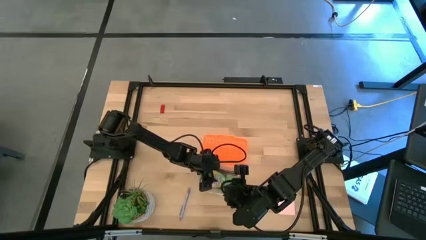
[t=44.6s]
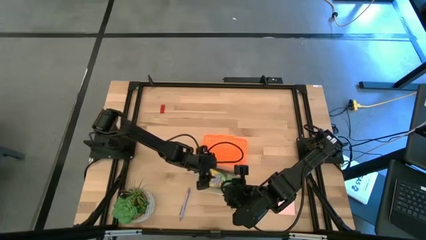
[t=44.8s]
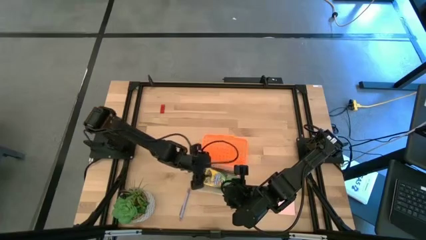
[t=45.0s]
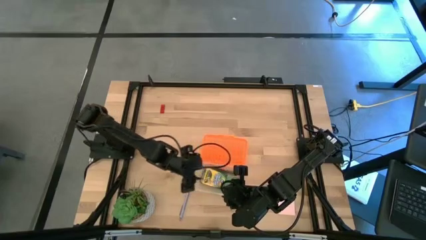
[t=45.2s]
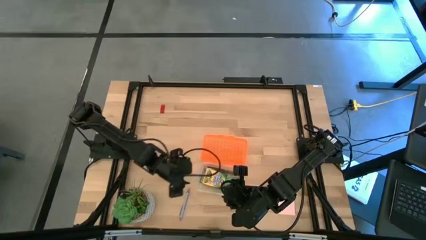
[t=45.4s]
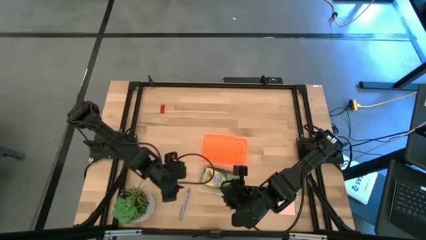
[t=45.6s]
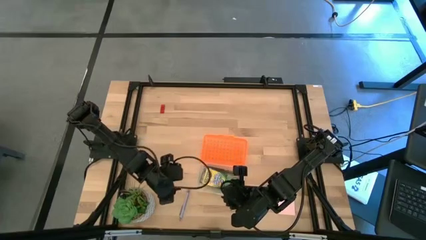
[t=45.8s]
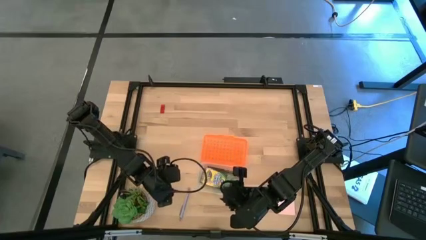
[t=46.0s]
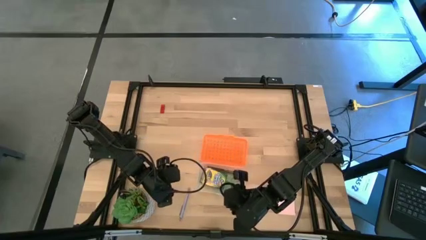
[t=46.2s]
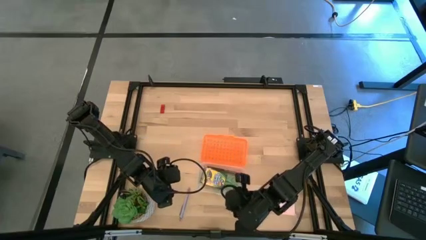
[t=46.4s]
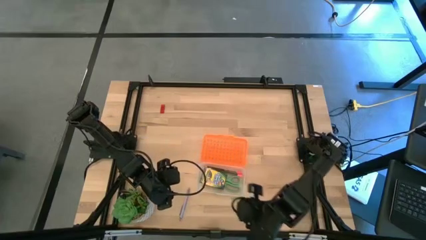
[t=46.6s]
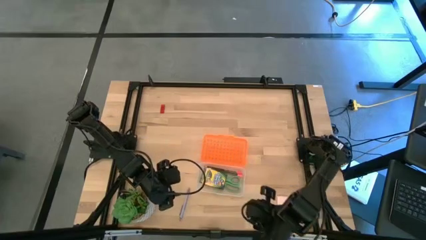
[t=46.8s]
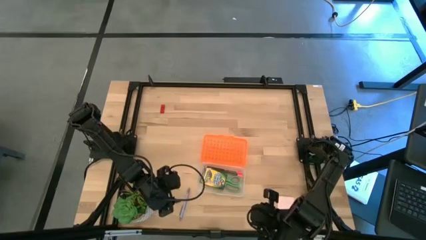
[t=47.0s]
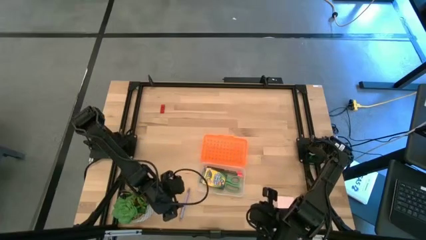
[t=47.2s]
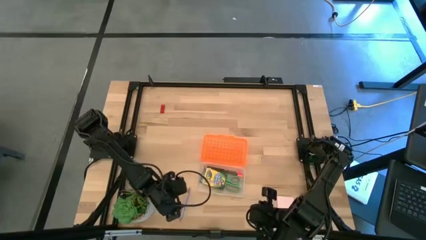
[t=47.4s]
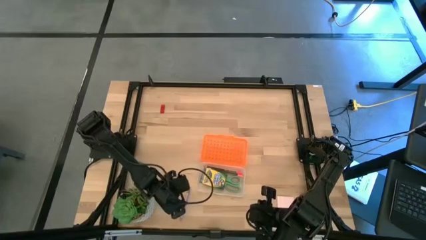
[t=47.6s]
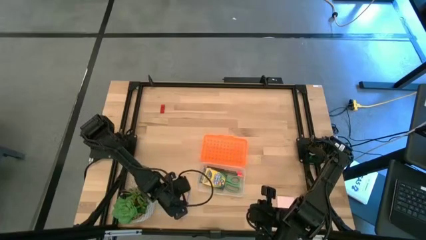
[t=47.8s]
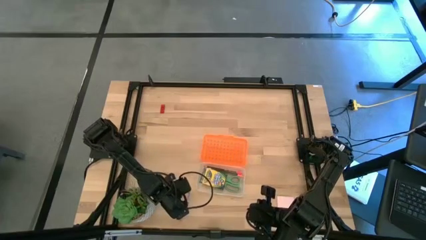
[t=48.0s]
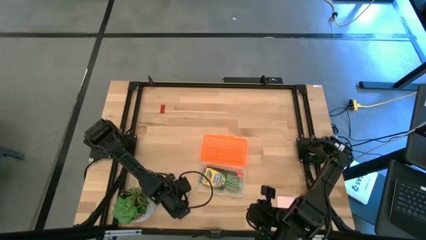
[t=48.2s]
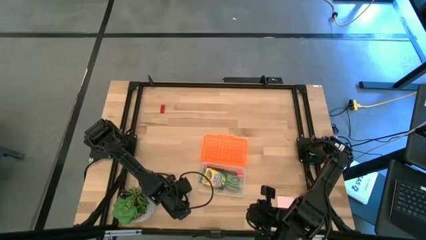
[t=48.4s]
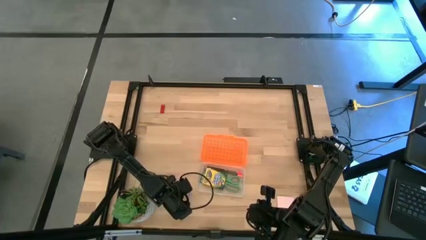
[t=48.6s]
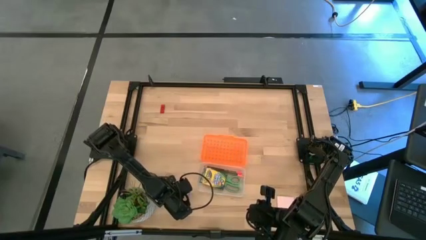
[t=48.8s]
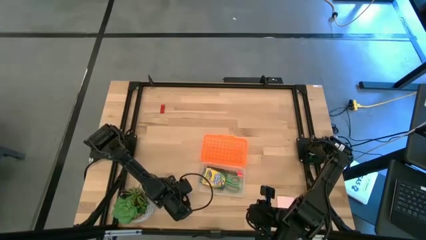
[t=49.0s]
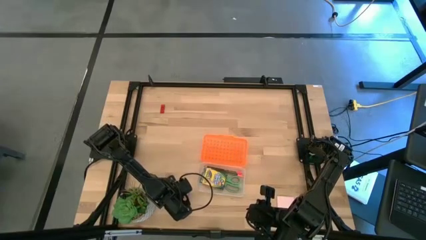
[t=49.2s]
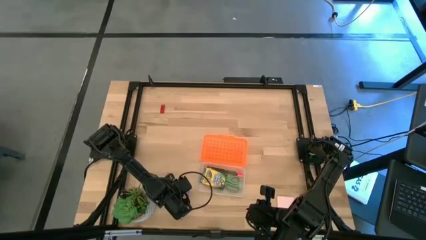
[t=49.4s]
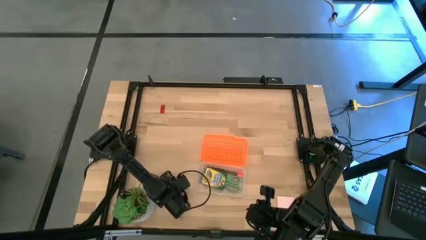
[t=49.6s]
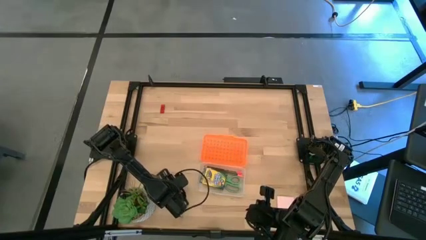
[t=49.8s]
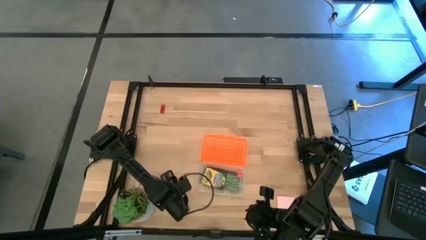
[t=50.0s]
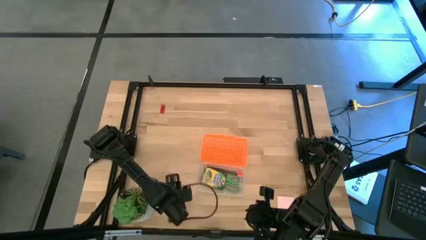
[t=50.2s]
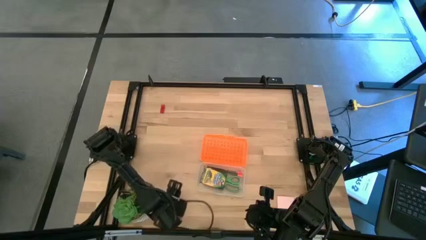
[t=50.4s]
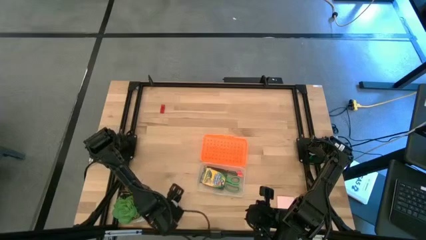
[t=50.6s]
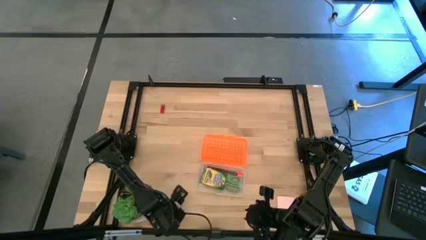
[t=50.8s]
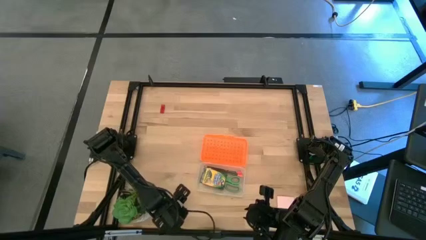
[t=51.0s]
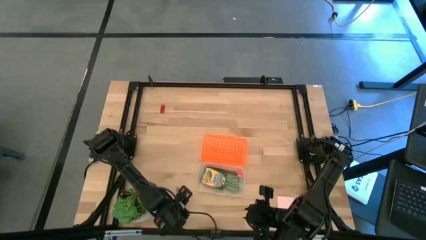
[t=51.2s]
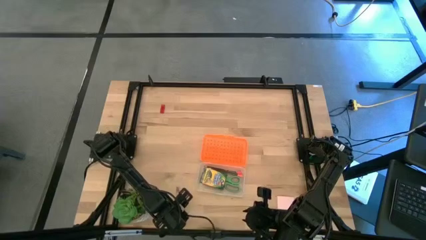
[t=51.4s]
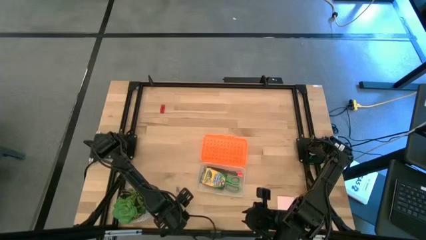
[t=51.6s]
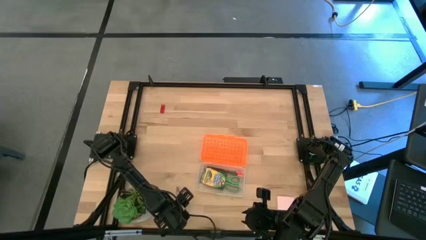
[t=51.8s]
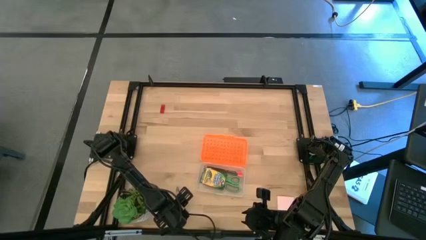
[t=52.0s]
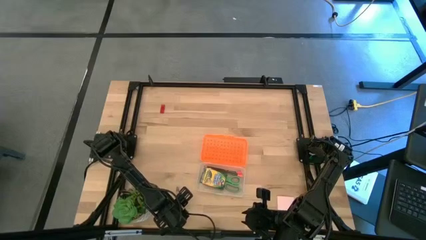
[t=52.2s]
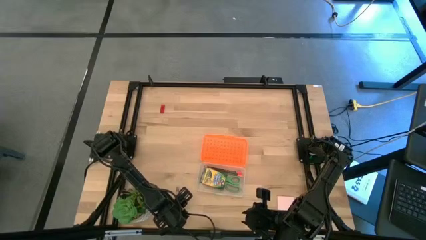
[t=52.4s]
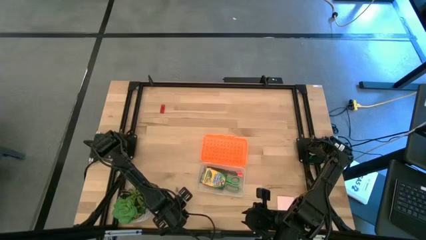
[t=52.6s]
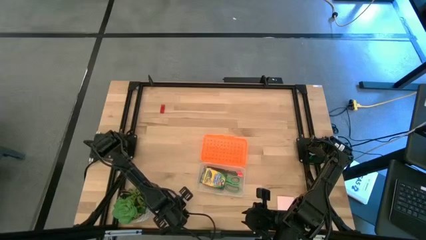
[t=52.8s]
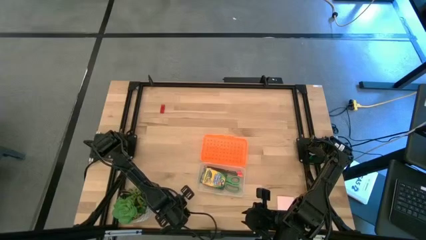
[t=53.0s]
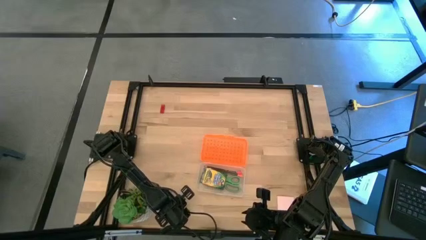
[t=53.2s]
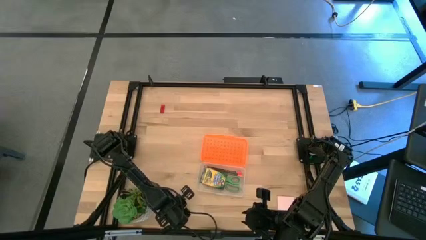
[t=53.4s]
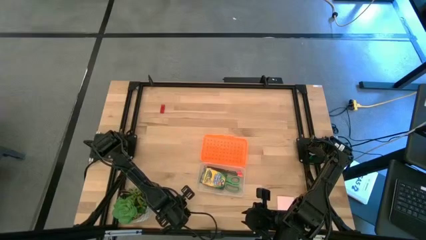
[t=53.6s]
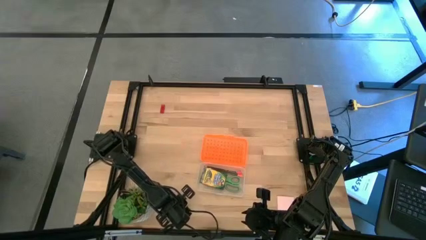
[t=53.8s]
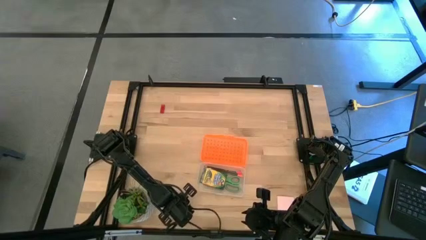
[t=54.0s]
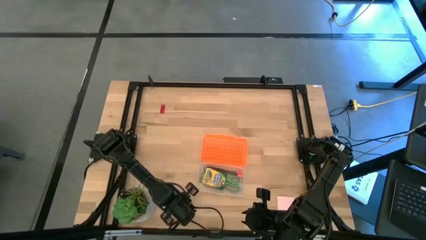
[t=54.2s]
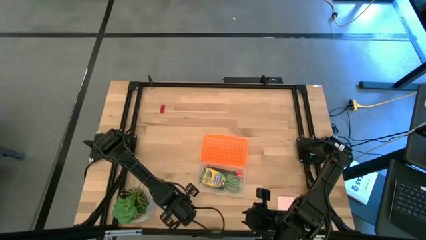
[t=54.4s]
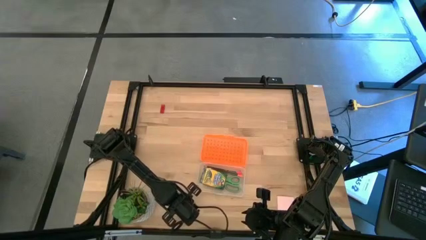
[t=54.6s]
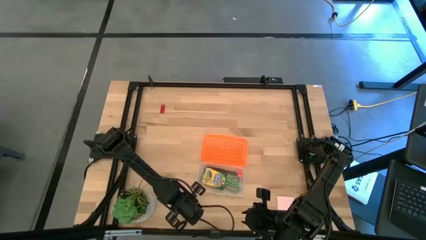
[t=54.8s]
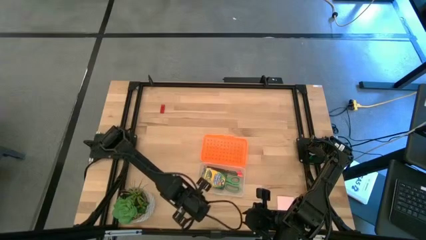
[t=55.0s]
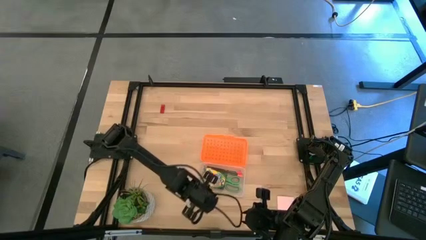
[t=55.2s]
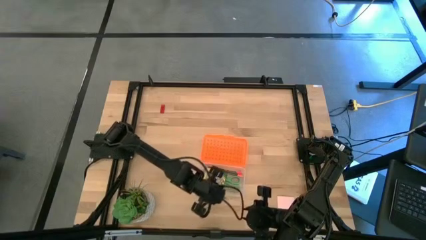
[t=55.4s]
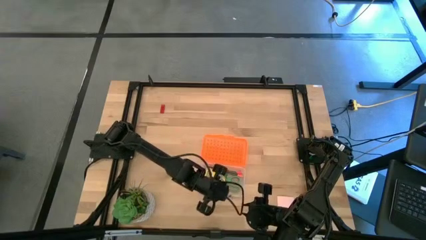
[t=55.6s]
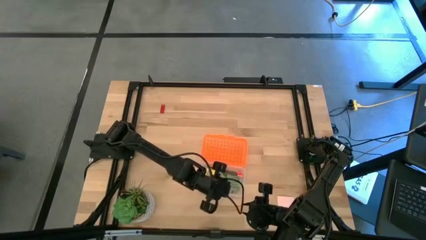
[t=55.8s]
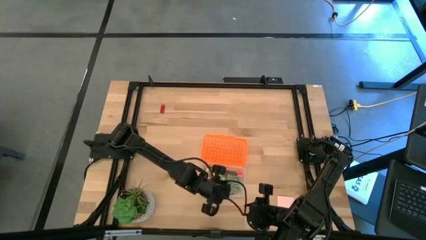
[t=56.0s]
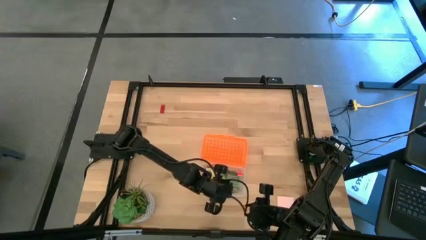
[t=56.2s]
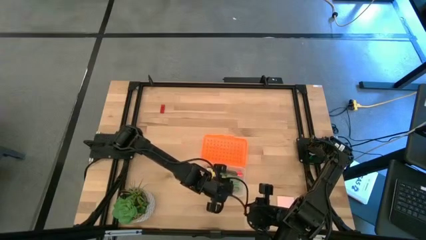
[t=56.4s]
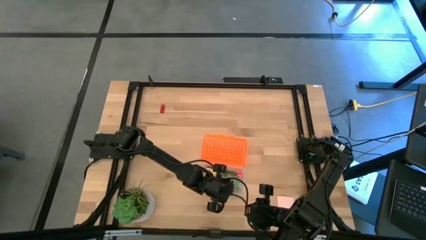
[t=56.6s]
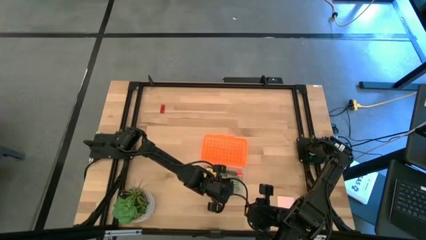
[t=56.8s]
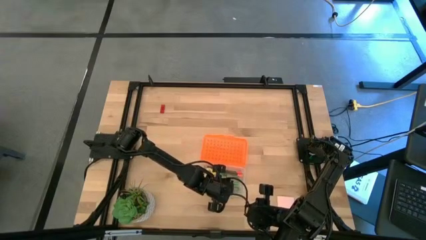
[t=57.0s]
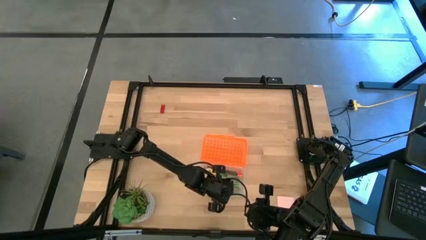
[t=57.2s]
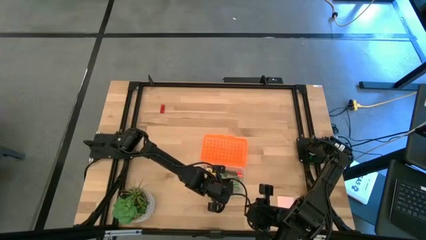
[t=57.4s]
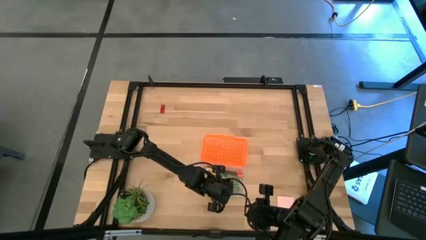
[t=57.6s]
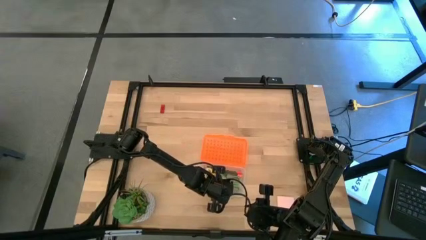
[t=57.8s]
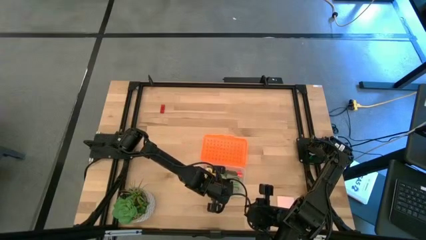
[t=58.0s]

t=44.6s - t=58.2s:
Task: Pack school essentials
Put the gray pen into the orange supply box
